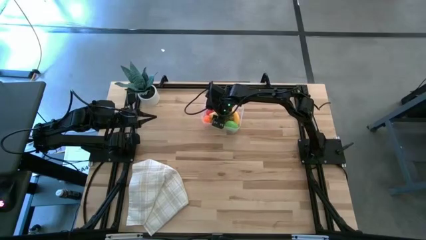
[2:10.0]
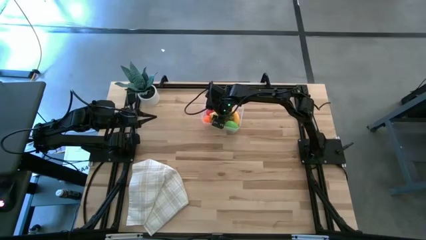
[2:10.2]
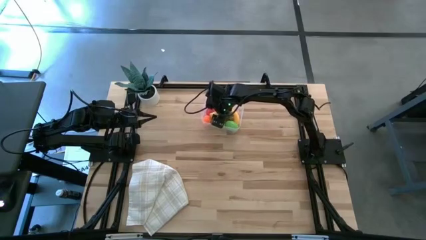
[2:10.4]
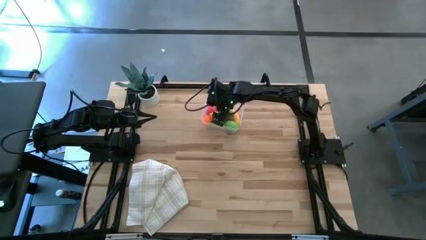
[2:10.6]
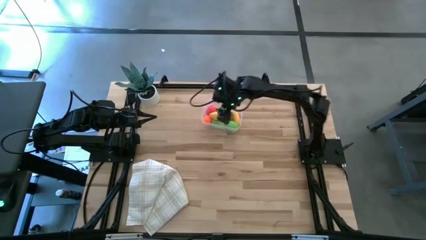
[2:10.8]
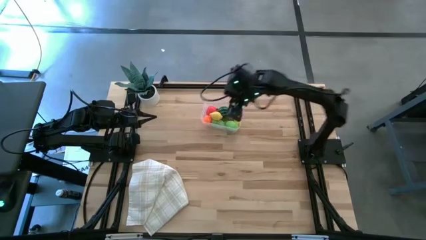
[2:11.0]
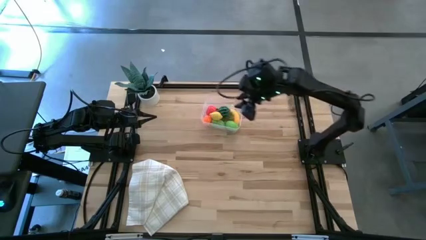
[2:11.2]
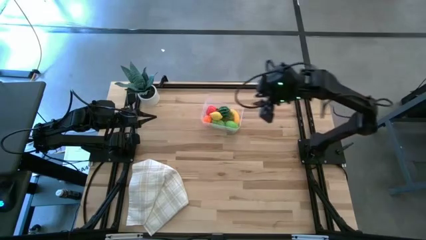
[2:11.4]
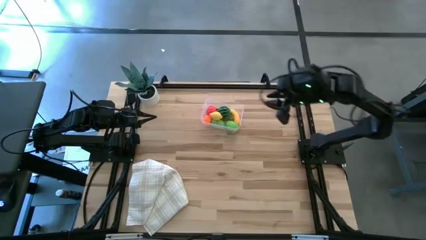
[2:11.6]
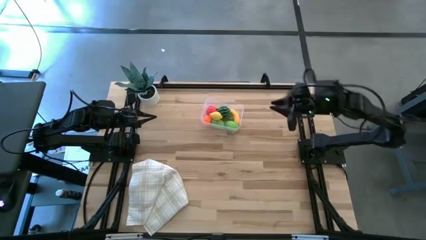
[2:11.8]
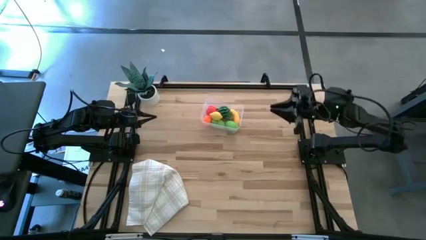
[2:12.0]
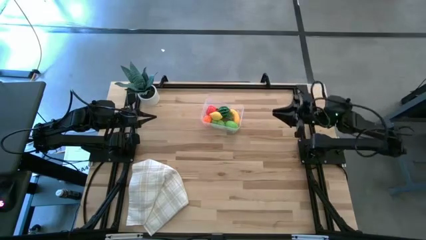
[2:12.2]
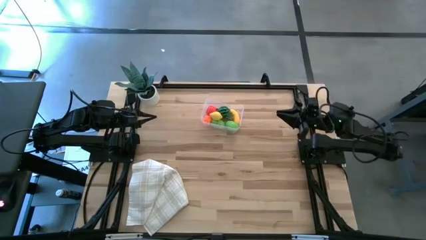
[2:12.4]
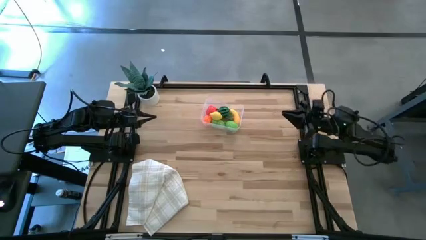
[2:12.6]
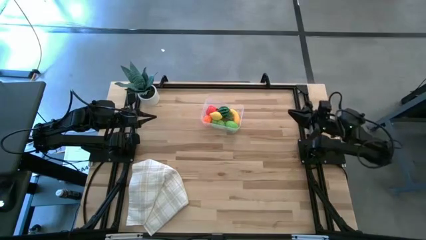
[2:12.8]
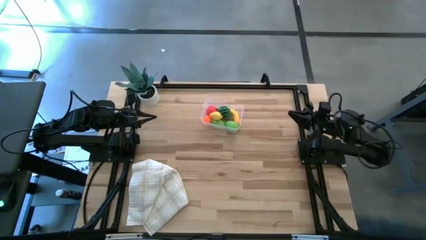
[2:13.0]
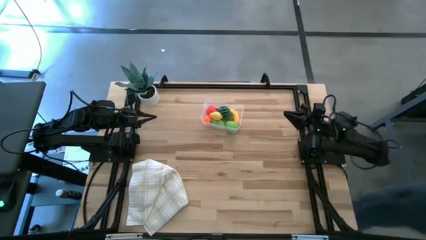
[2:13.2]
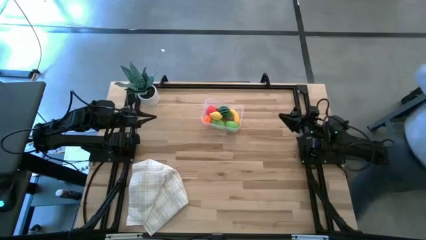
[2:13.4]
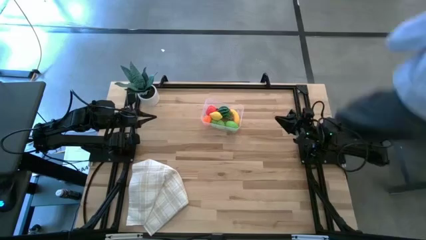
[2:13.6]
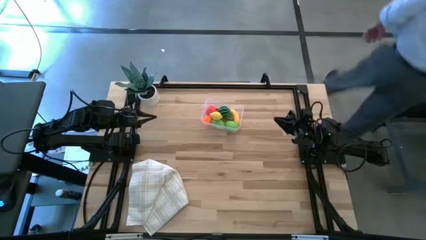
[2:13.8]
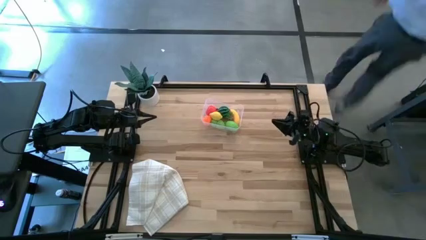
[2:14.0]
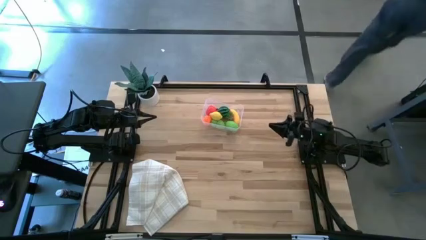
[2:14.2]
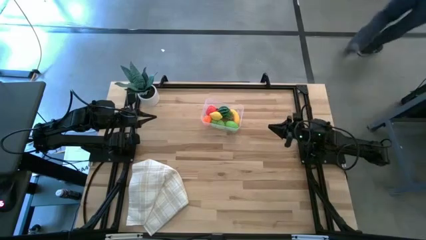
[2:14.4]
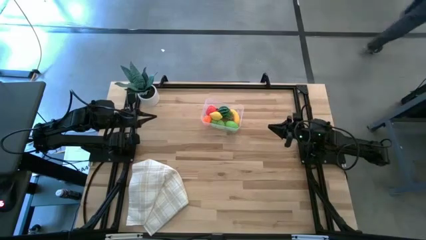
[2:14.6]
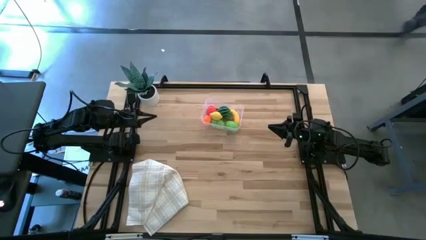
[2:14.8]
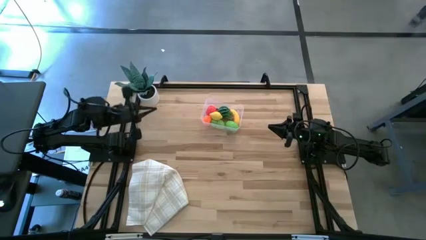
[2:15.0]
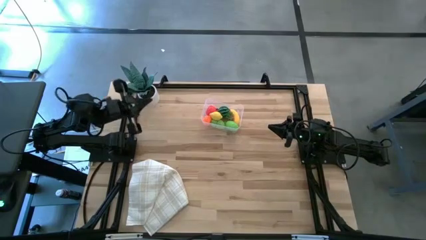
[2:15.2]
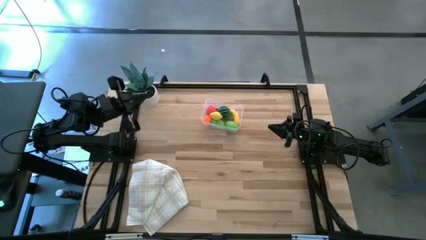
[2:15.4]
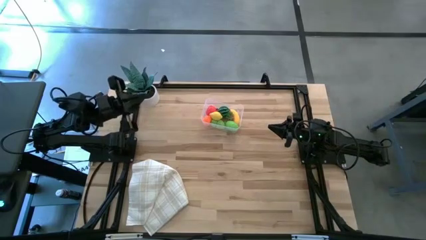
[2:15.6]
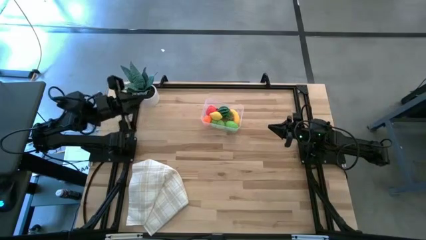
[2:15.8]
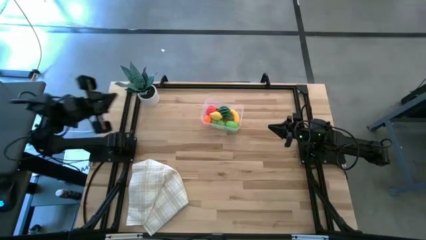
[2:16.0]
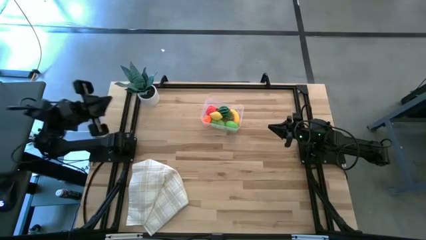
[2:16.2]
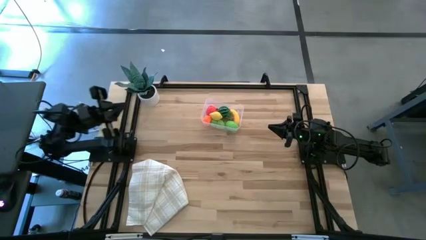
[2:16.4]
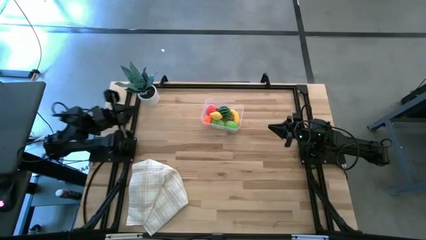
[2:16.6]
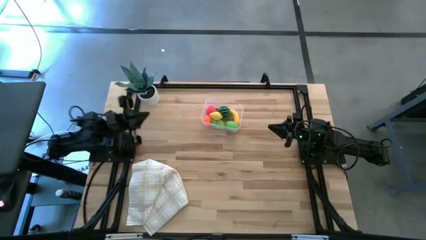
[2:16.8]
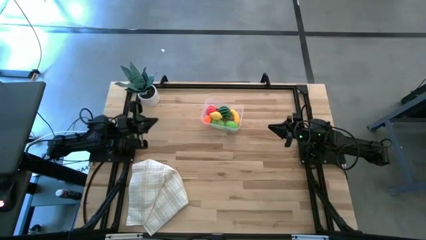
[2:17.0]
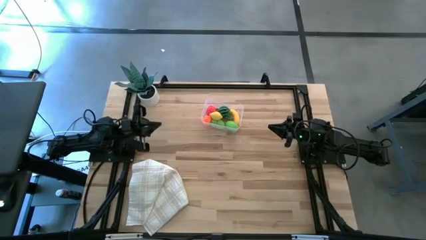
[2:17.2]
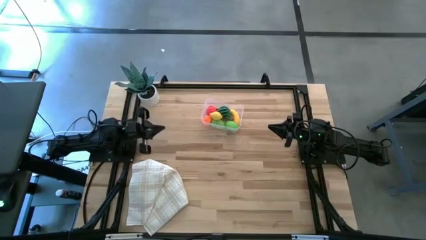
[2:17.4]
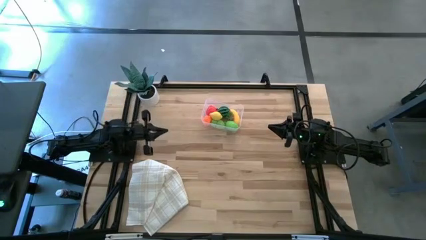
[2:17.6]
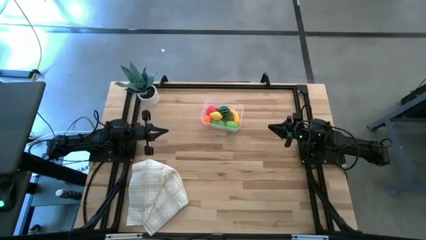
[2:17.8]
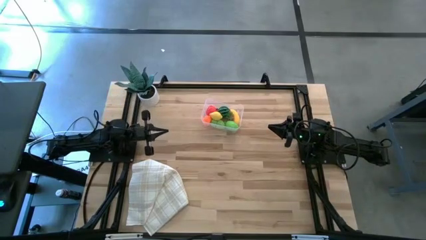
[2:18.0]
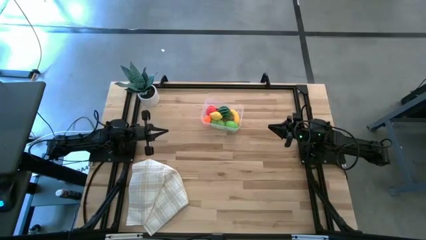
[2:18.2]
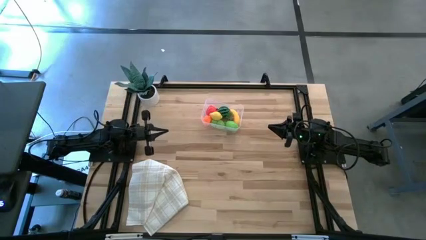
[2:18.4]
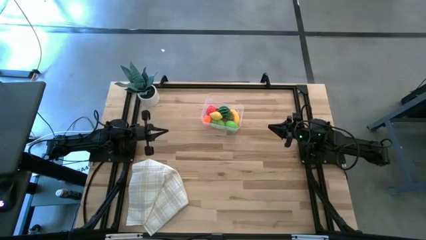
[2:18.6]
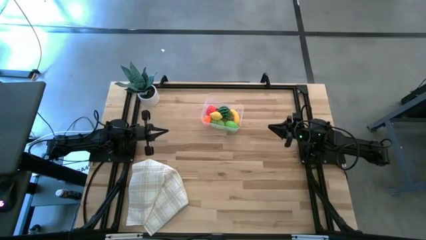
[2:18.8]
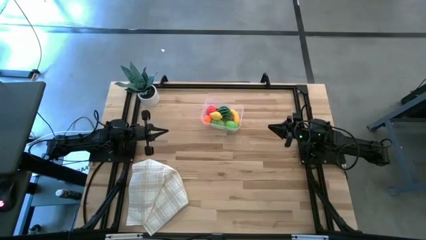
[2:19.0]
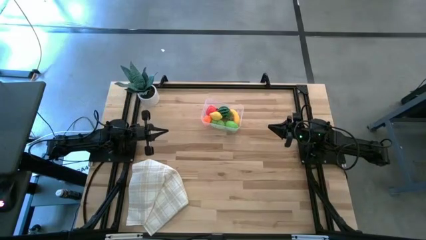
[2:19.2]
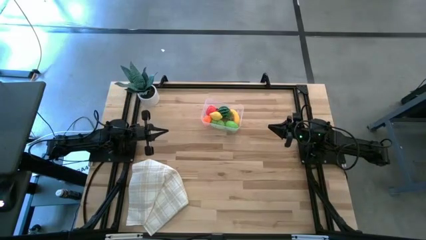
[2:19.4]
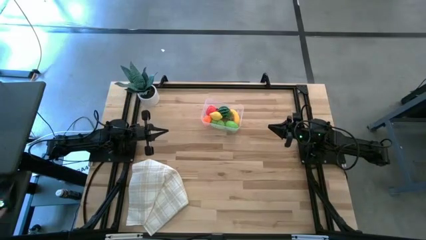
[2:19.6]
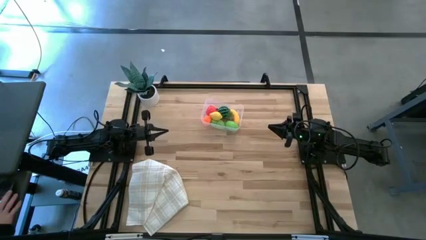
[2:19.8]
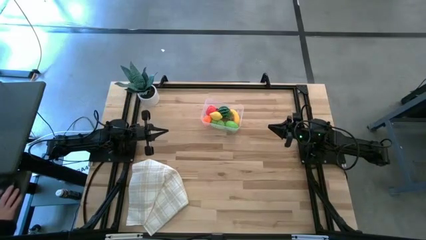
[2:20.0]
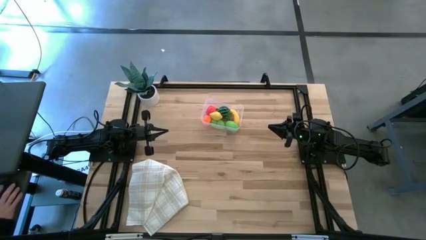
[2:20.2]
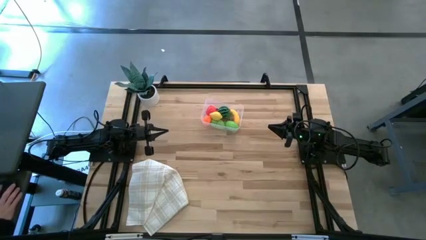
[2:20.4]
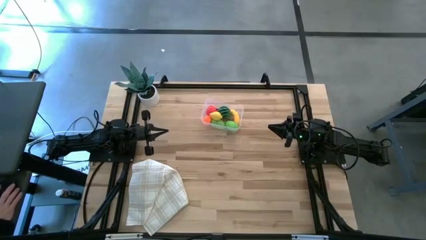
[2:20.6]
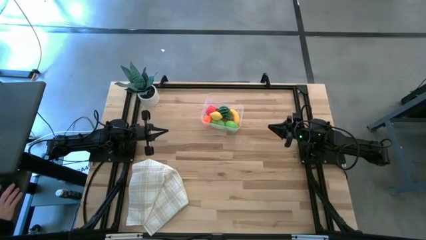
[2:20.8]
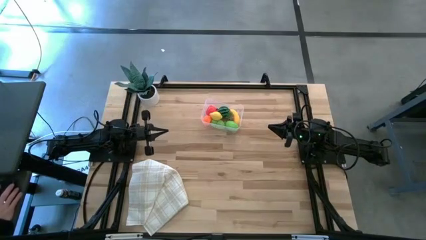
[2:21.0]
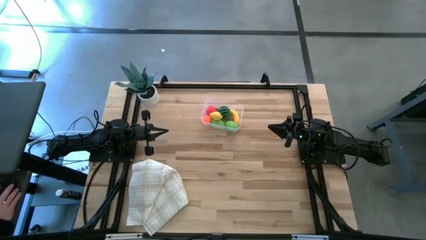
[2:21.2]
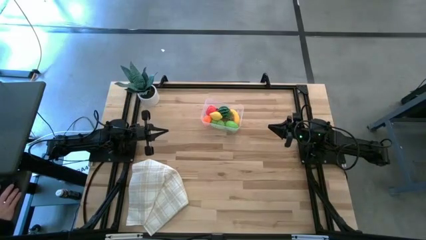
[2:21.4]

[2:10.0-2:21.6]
Task: Pick and placing Produce into tupperware
Return to Home Position

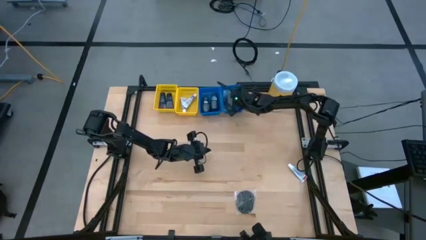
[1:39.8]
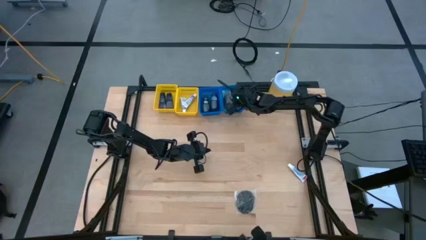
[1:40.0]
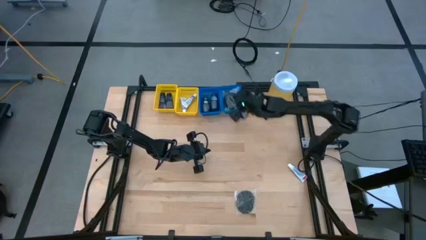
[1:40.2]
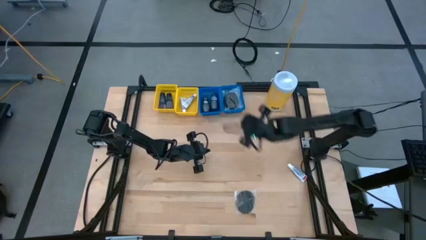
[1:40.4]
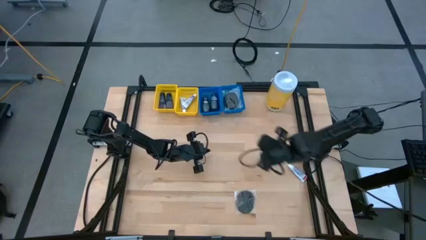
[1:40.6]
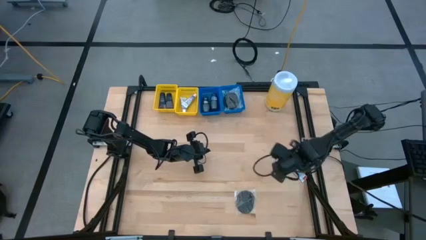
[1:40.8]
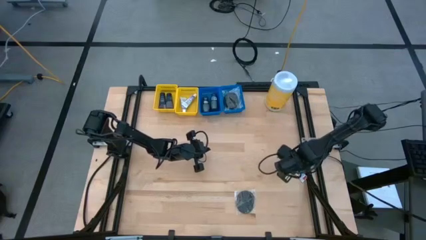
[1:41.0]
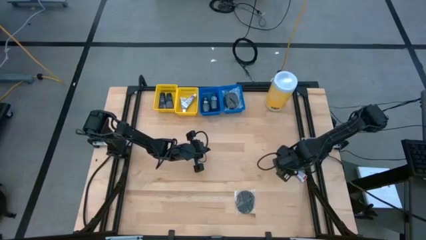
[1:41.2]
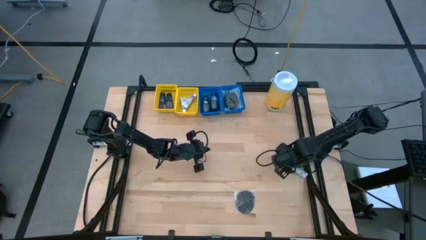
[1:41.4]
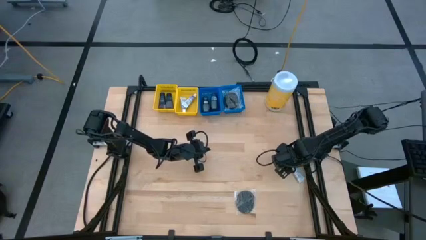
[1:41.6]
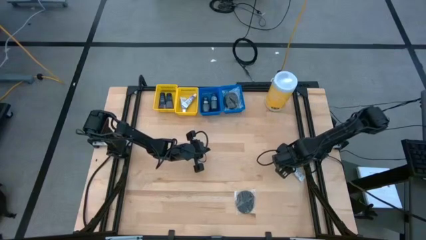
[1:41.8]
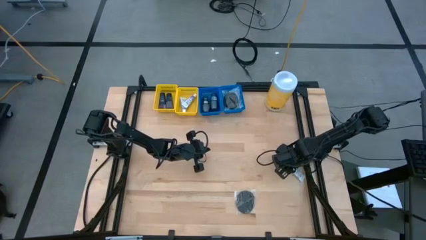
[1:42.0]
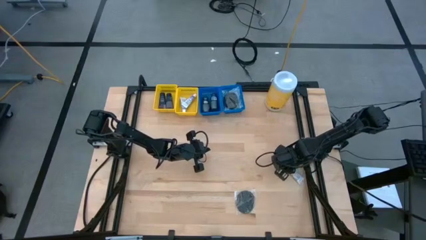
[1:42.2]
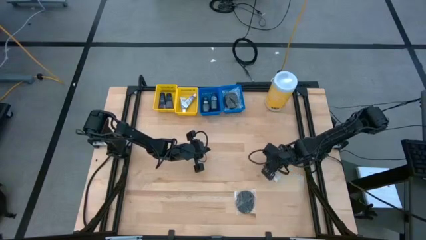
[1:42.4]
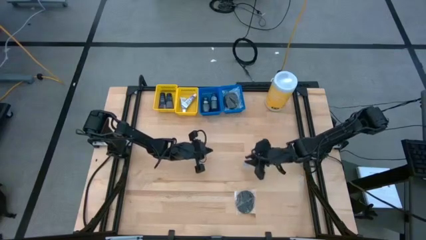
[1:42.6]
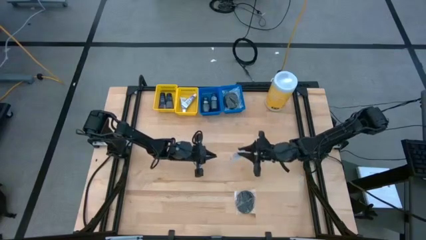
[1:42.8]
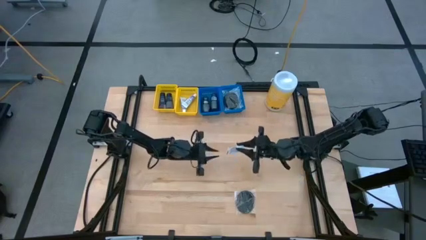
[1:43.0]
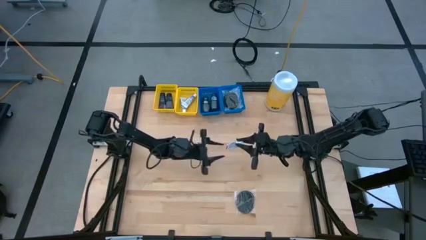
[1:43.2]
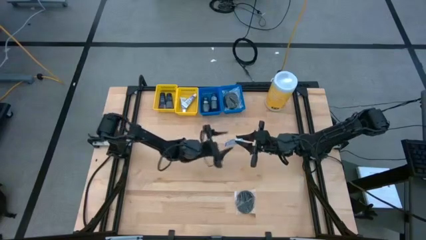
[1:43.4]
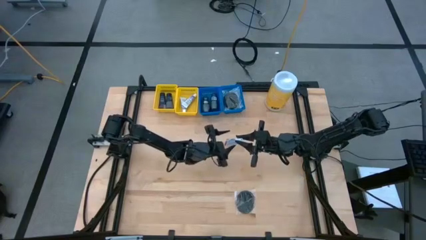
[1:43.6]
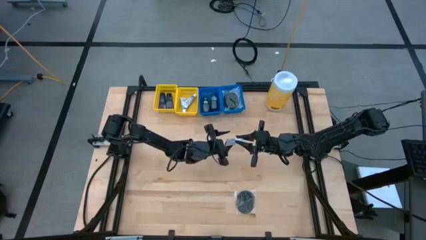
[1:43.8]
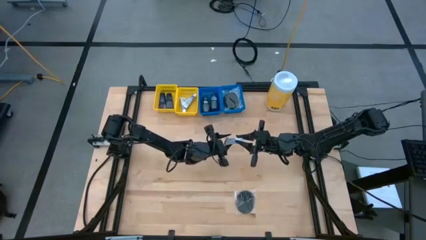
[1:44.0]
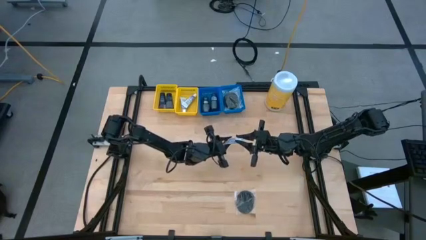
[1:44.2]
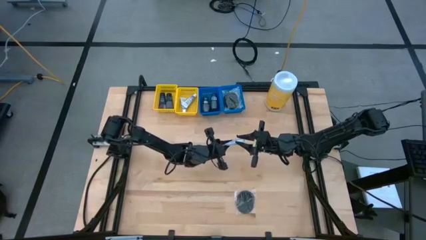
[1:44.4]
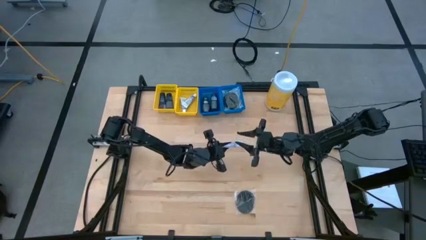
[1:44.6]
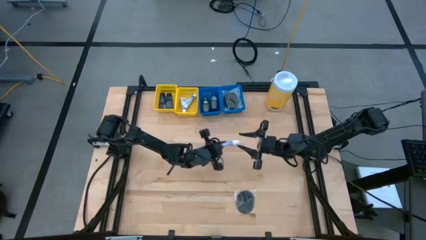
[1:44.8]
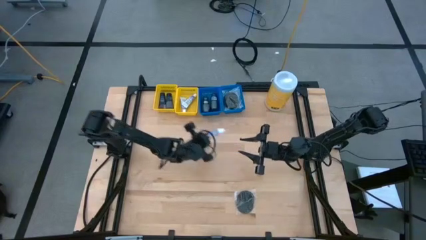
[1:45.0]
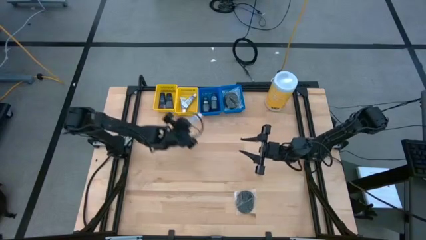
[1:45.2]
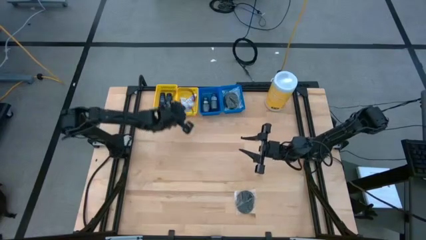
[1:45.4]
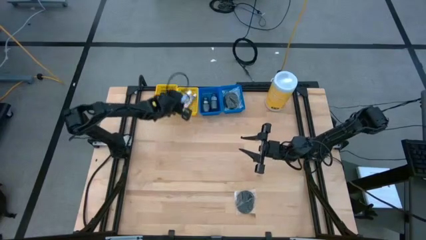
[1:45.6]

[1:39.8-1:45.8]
Task: Pick & Place Travel size toiletries
Put the white toothpaste into the right yellow bin
